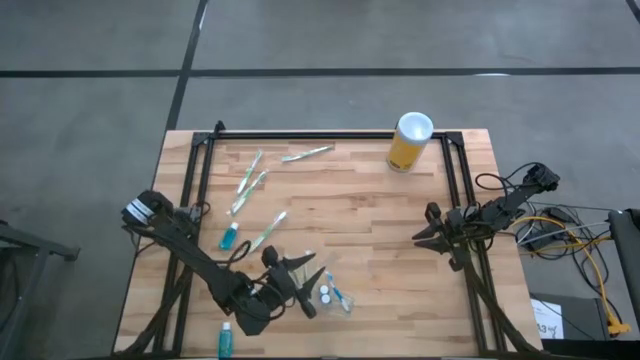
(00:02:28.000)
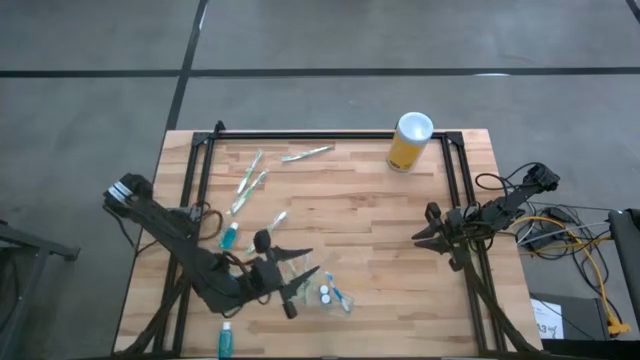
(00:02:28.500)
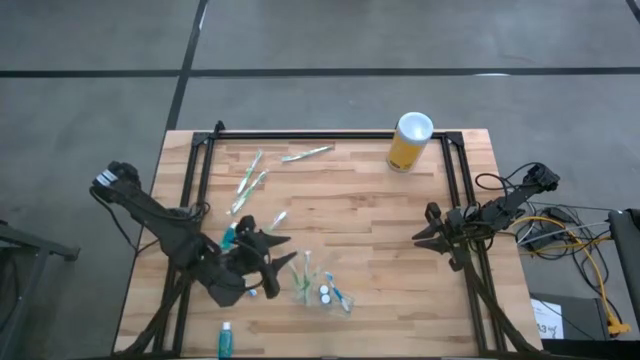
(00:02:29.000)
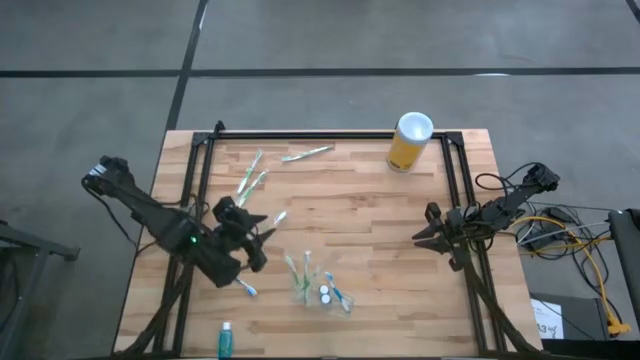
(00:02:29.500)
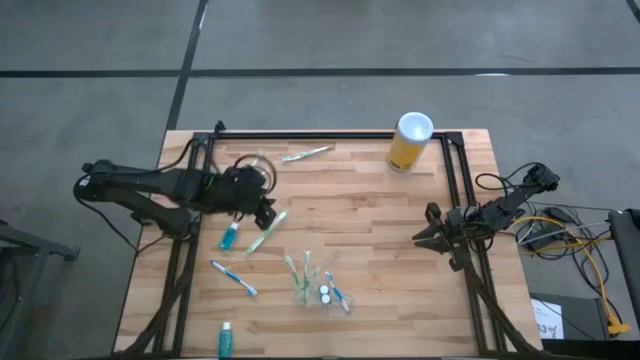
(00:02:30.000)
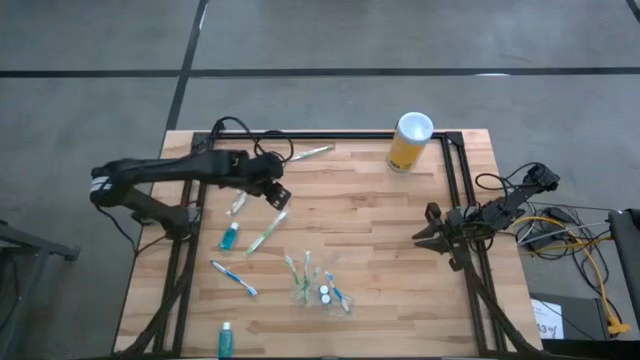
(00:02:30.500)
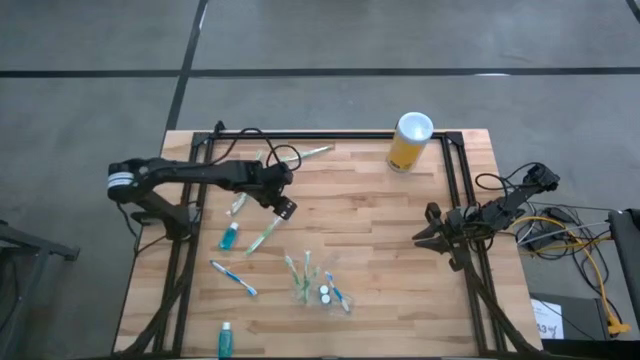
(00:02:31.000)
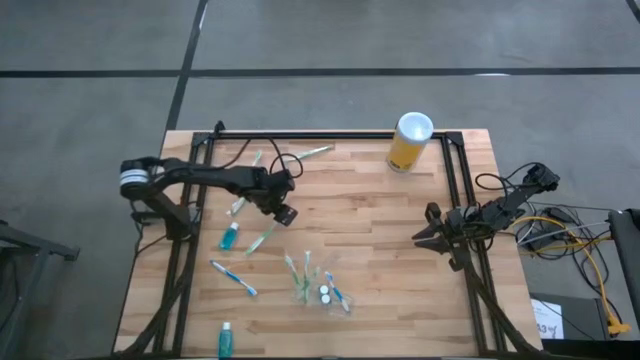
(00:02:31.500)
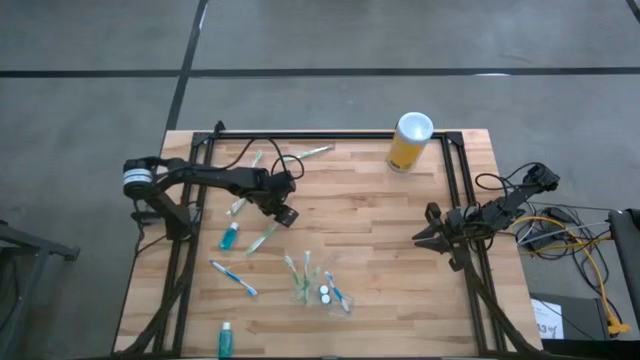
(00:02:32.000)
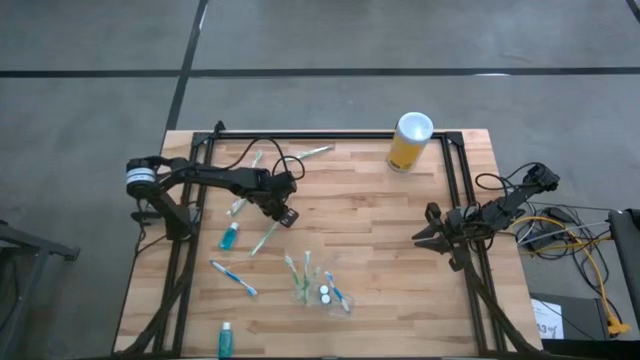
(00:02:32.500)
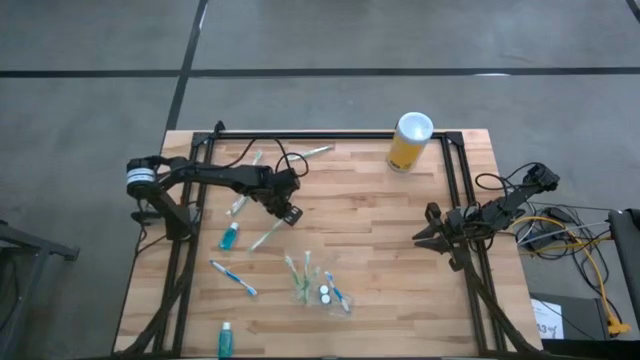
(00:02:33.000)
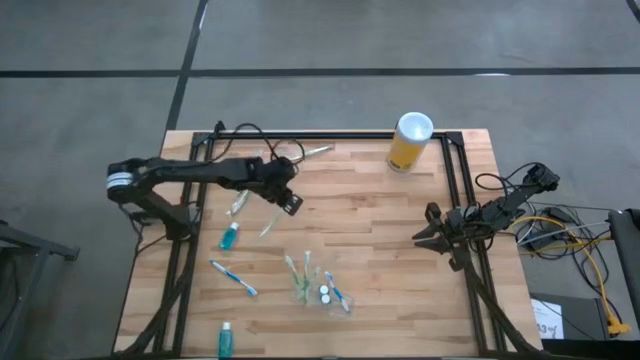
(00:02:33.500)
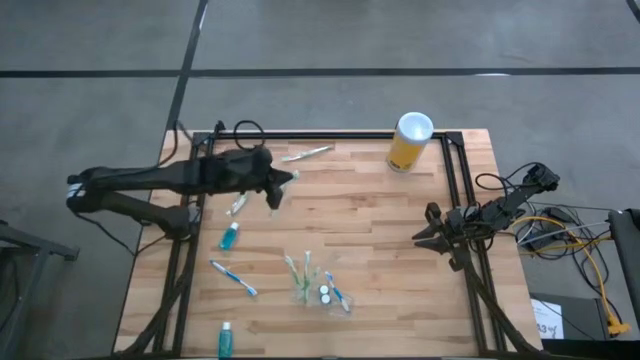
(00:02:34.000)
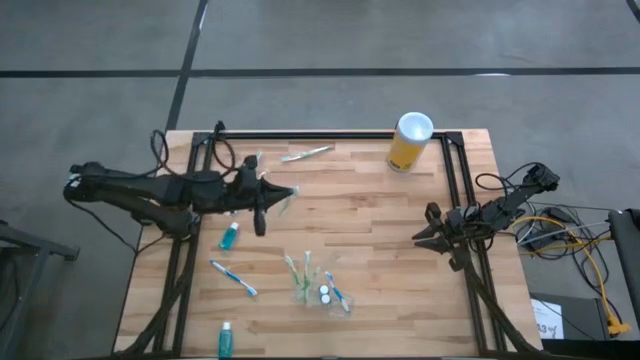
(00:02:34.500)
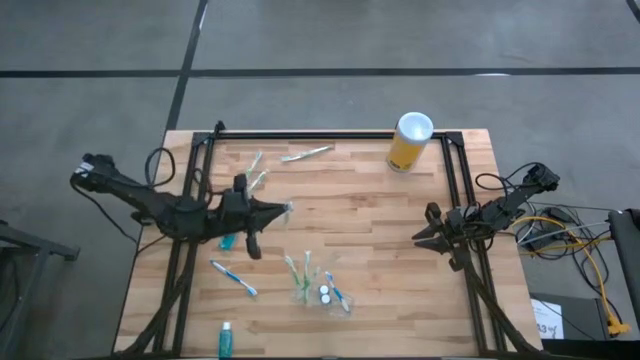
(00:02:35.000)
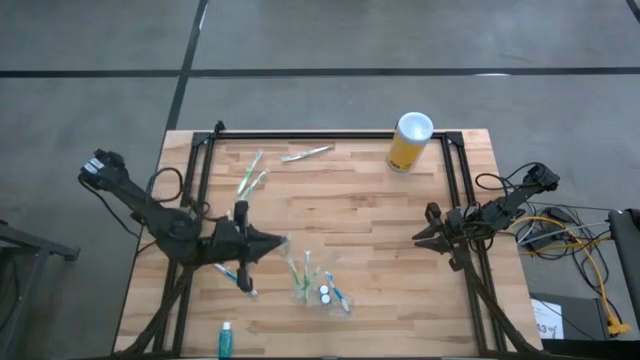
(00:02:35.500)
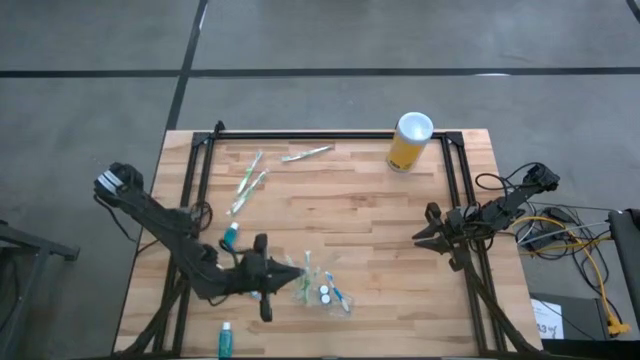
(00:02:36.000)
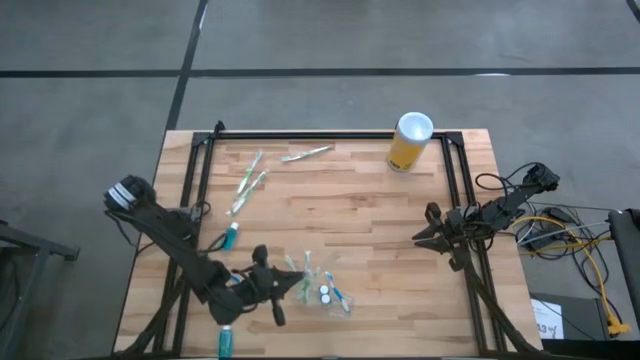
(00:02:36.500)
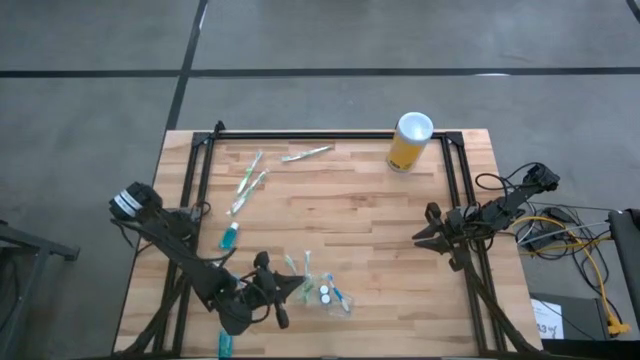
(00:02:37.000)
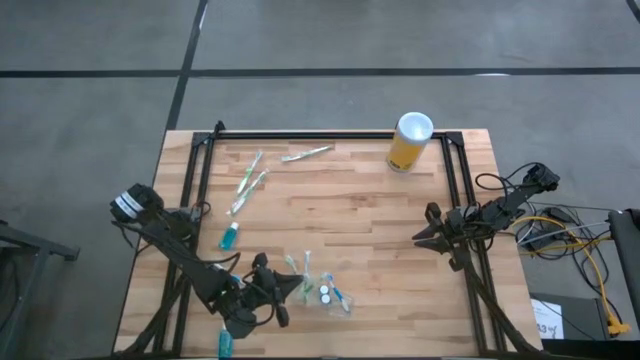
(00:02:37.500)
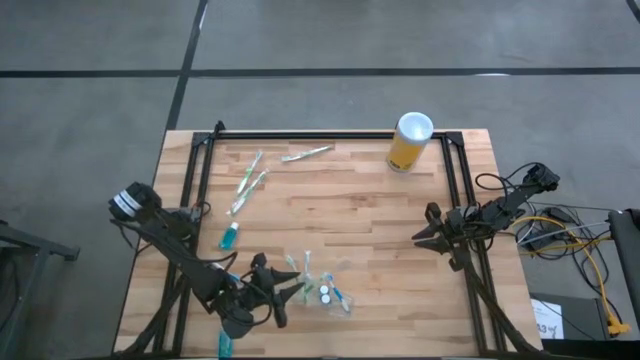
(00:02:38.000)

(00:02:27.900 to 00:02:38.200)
Task: Pick & Place toothbrushing station
Put the green toothbrush into the transparent organizer

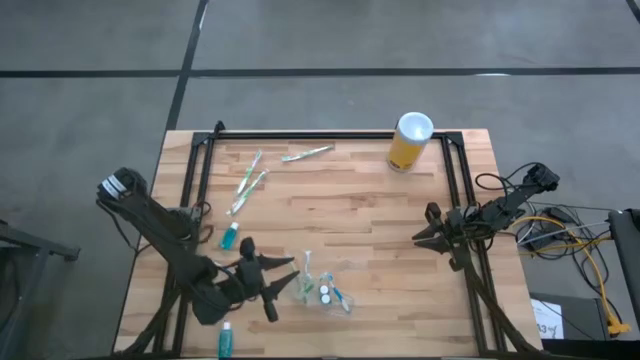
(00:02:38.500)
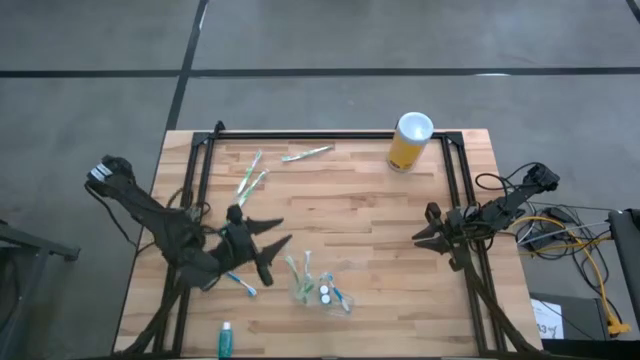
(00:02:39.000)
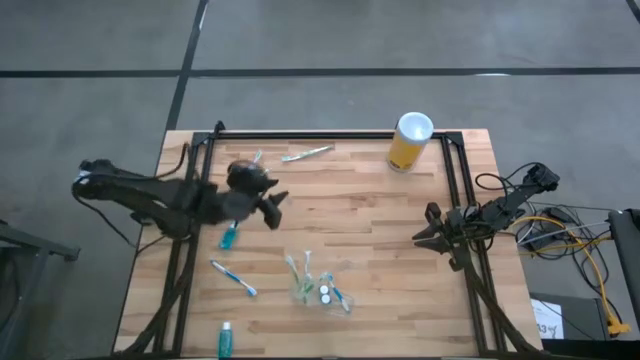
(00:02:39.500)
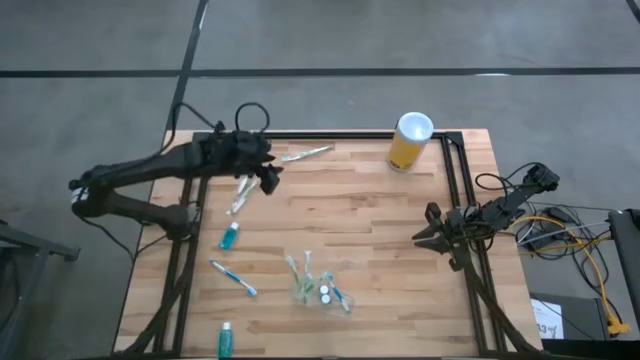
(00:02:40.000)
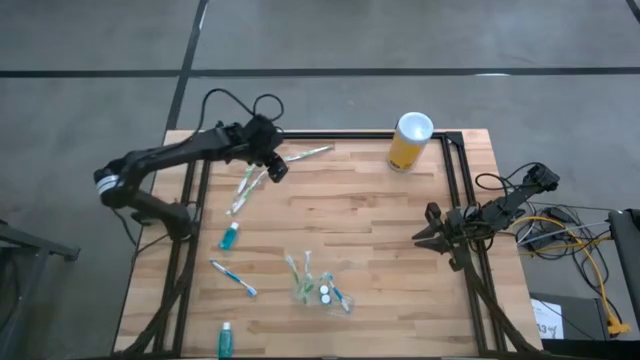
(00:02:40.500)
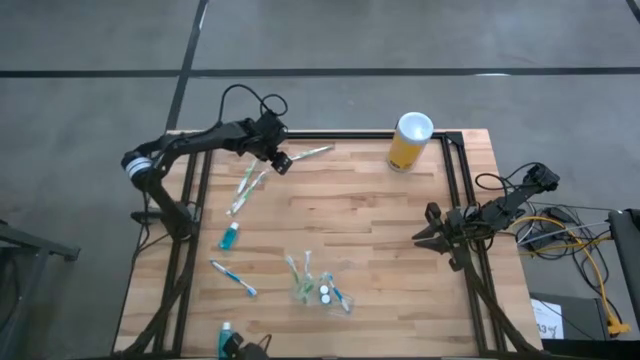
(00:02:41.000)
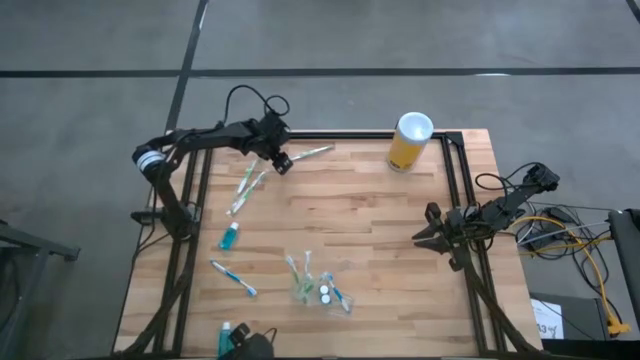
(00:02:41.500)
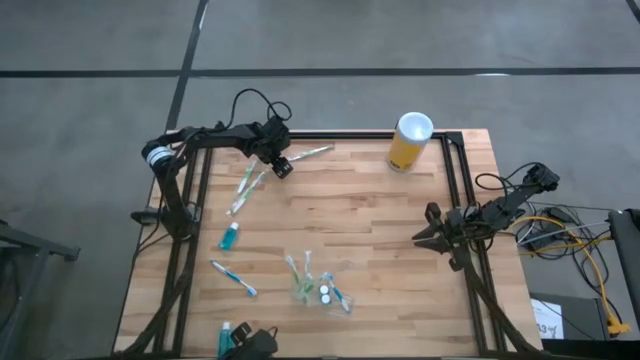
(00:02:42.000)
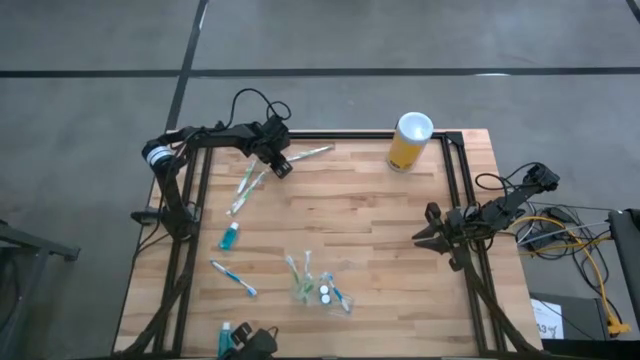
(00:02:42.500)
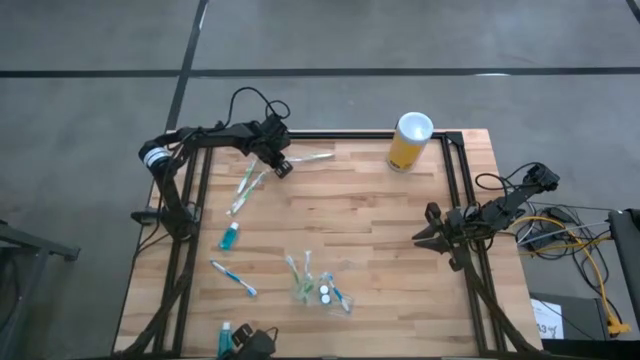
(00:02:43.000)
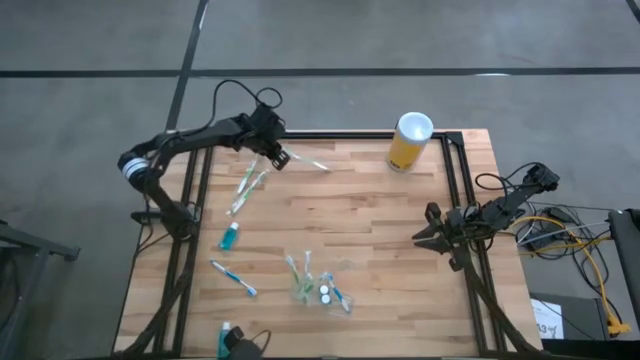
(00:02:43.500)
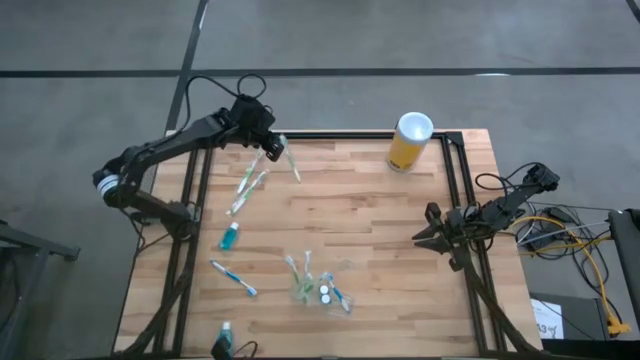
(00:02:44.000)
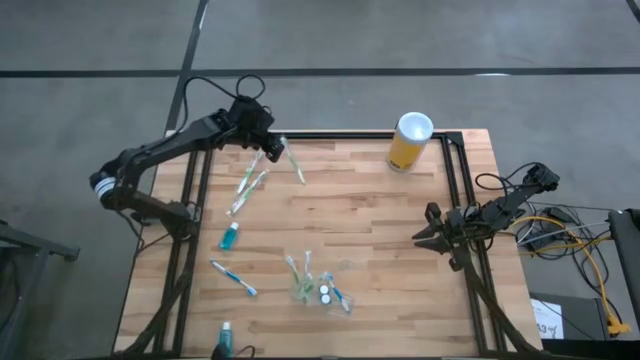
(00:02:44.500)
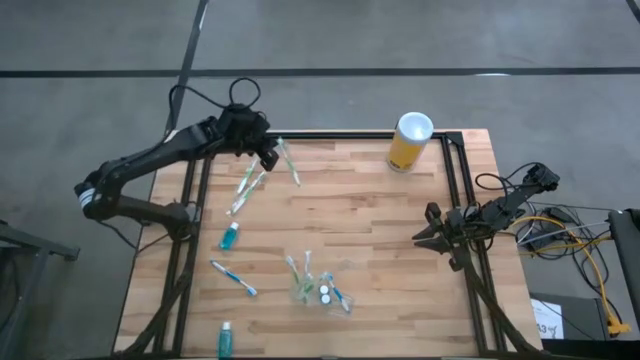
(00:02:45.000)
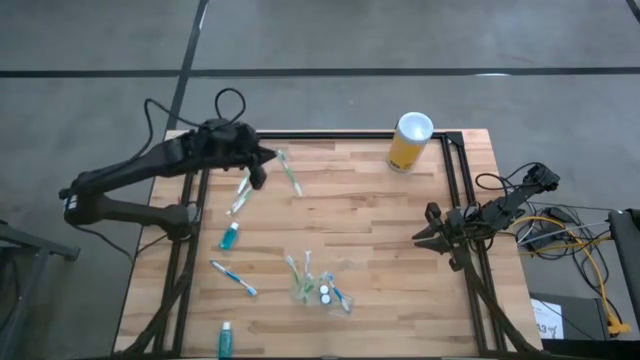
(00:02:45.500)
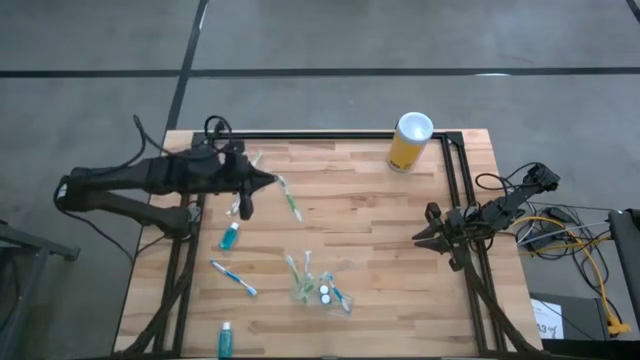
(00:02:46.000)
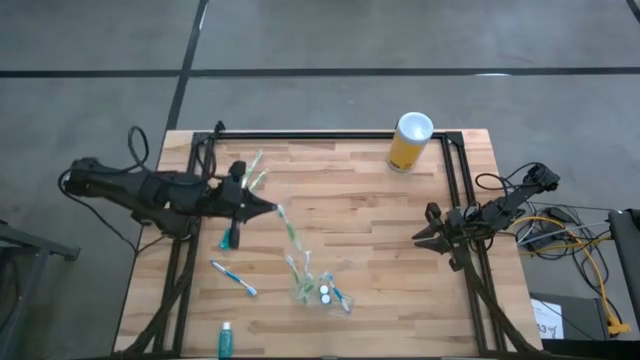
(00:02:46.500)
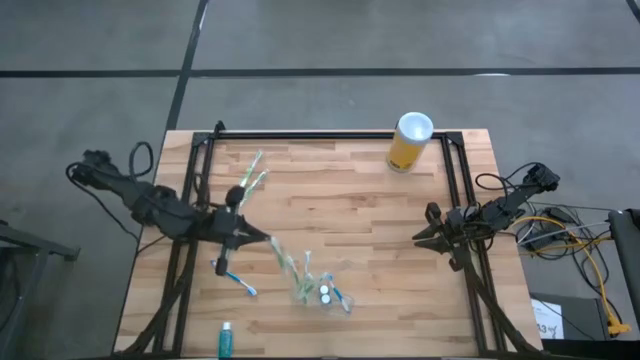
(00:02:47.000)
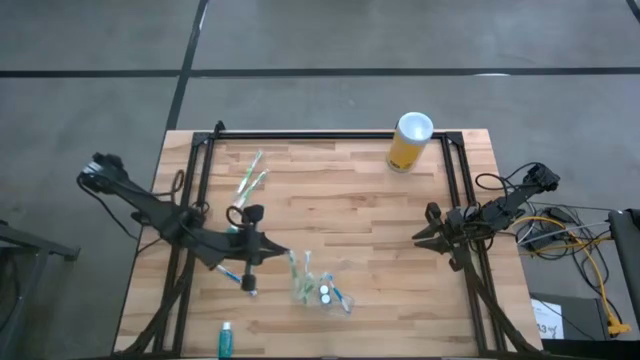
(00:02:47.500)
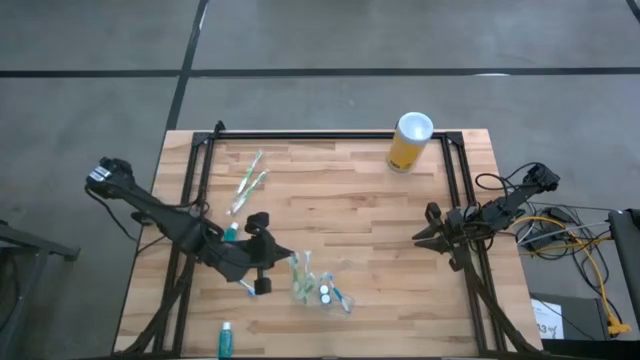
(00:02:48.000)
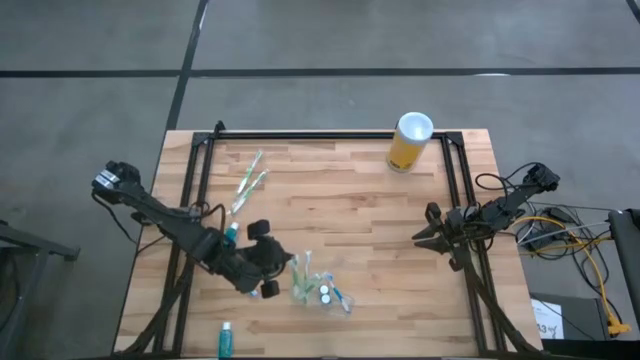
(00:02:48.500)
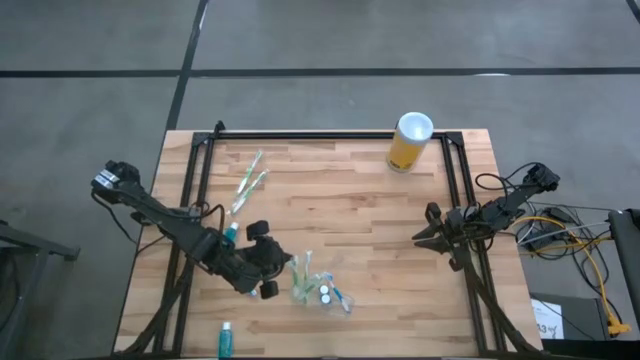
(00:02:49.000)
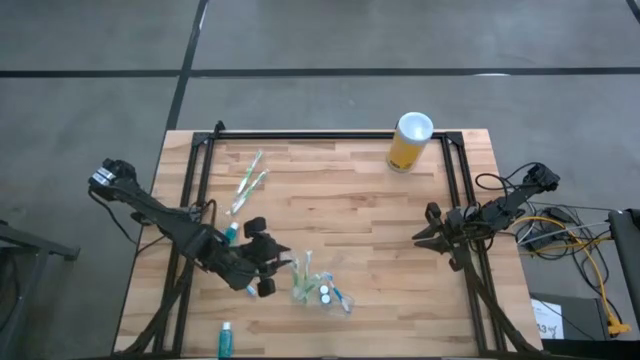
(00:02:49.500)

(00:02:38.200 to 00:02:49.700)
Put the green toothbrush into the transparent organizer
